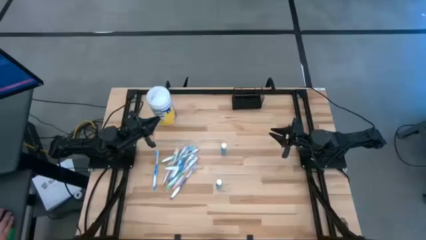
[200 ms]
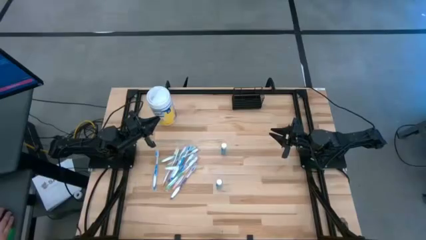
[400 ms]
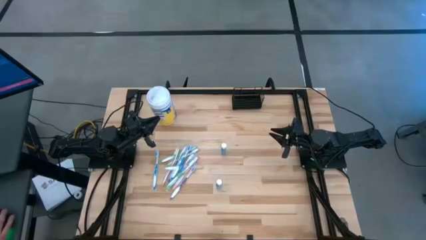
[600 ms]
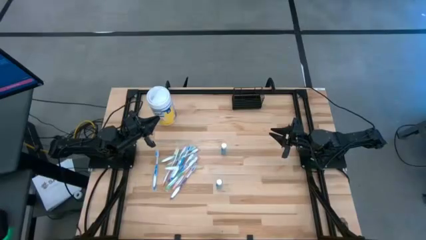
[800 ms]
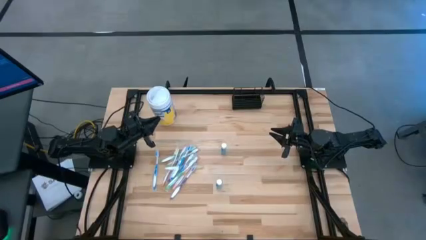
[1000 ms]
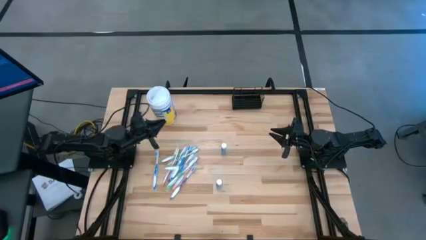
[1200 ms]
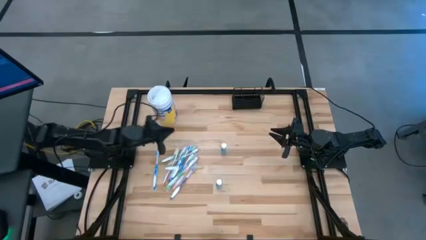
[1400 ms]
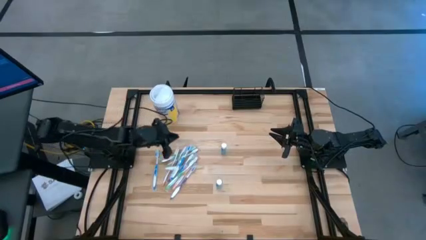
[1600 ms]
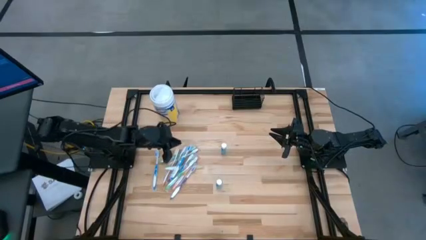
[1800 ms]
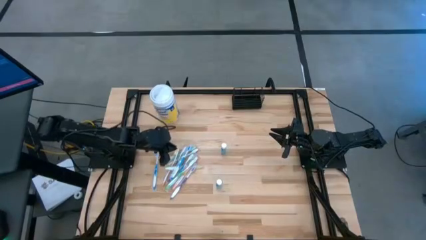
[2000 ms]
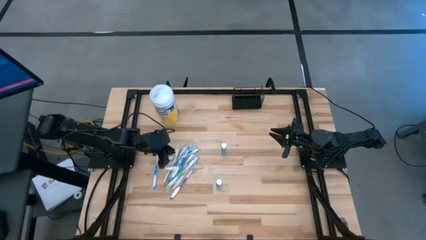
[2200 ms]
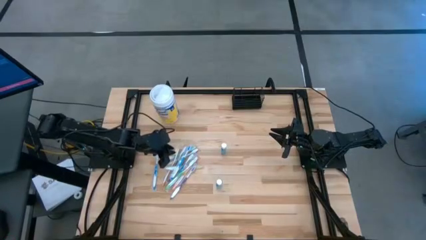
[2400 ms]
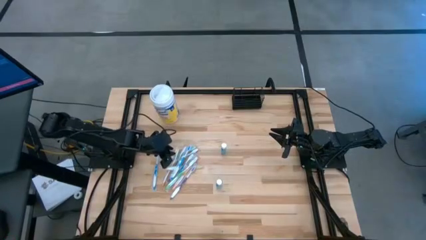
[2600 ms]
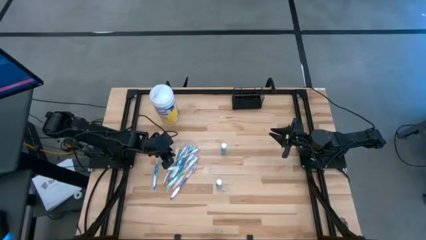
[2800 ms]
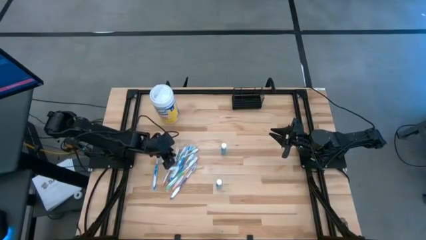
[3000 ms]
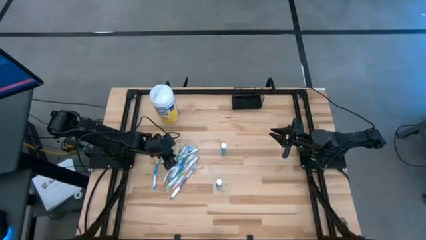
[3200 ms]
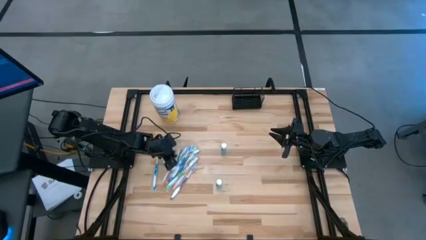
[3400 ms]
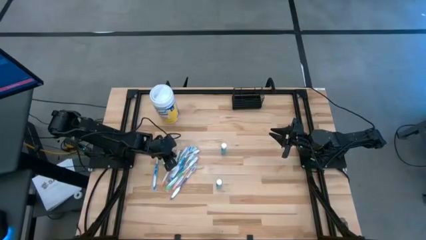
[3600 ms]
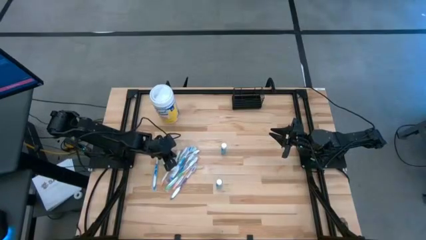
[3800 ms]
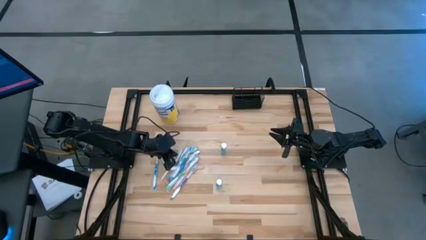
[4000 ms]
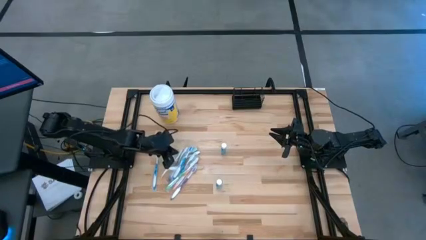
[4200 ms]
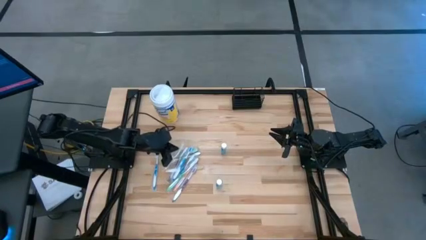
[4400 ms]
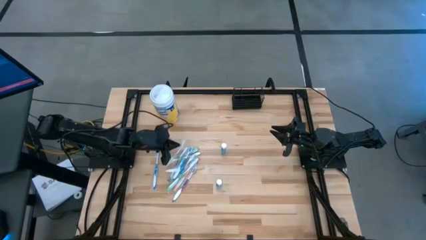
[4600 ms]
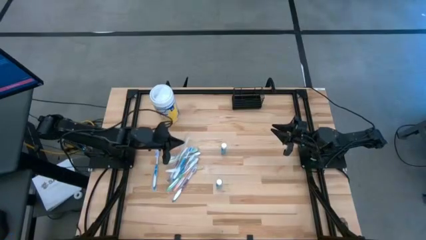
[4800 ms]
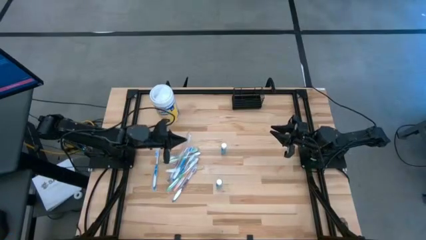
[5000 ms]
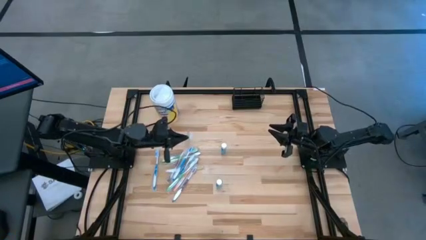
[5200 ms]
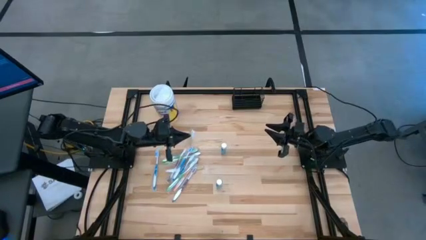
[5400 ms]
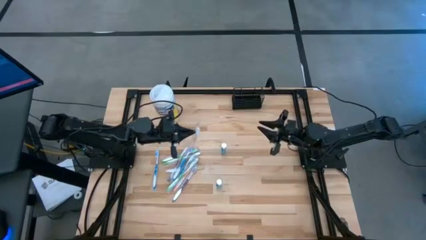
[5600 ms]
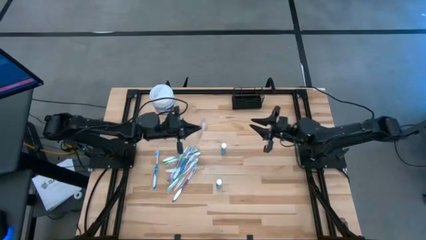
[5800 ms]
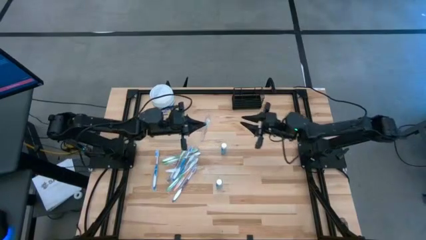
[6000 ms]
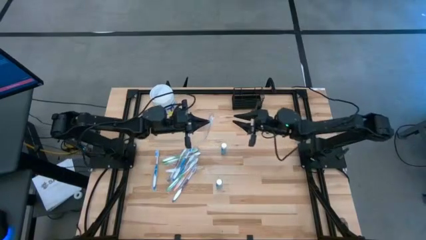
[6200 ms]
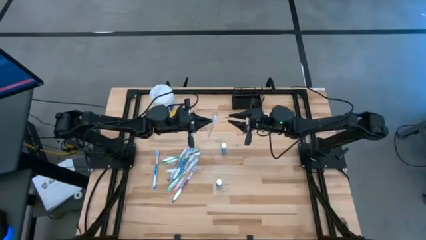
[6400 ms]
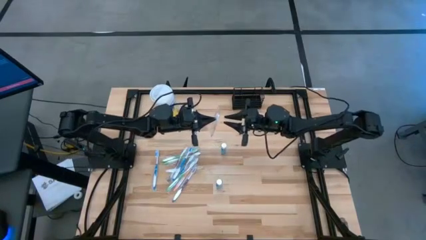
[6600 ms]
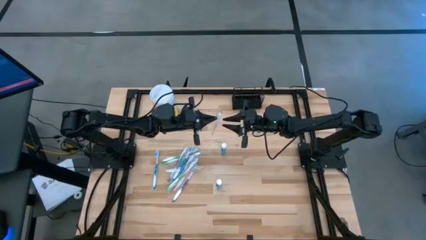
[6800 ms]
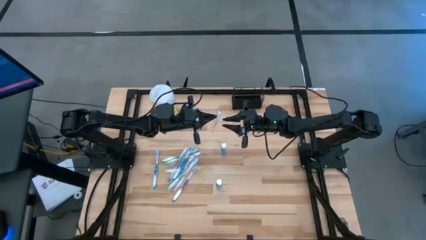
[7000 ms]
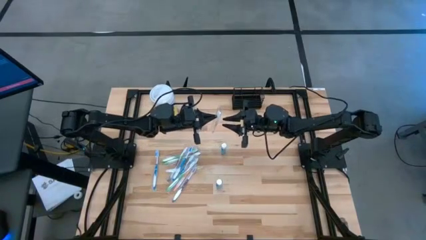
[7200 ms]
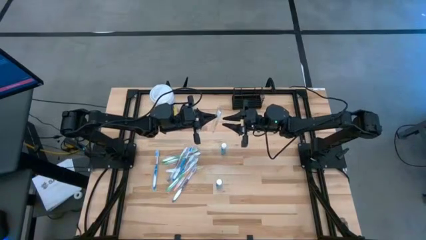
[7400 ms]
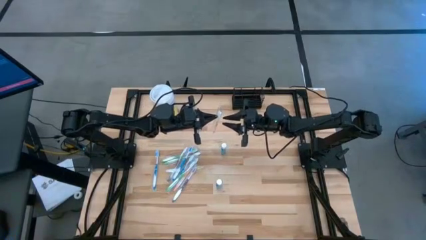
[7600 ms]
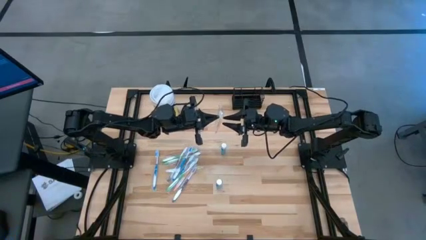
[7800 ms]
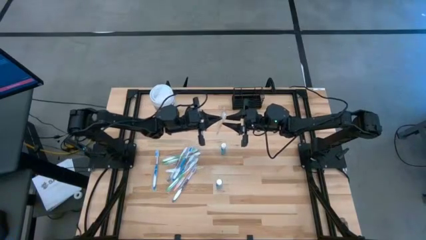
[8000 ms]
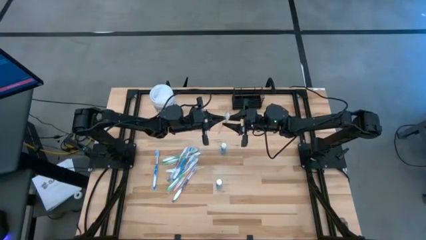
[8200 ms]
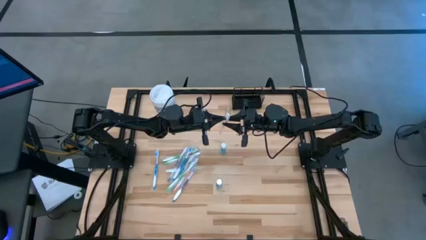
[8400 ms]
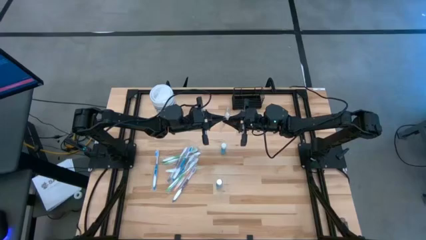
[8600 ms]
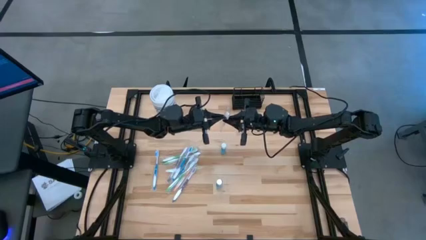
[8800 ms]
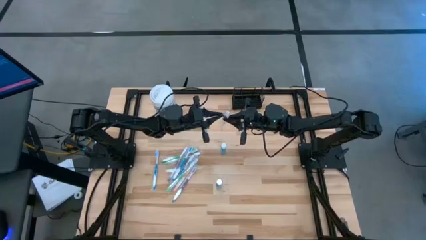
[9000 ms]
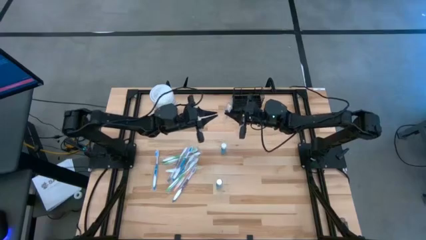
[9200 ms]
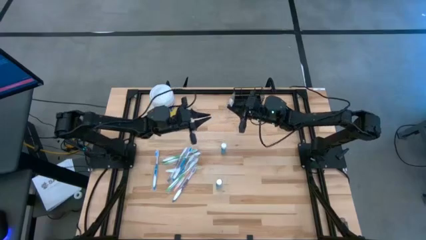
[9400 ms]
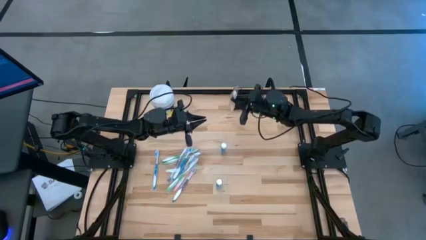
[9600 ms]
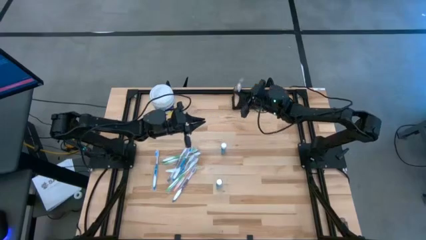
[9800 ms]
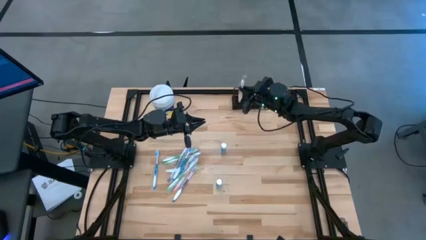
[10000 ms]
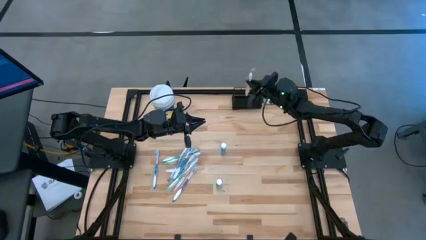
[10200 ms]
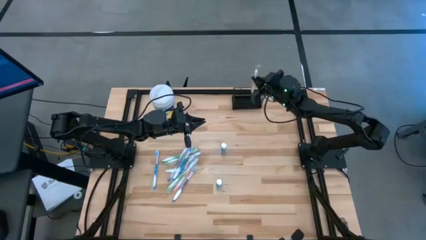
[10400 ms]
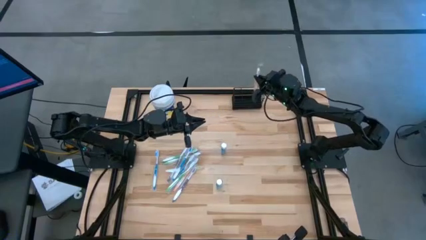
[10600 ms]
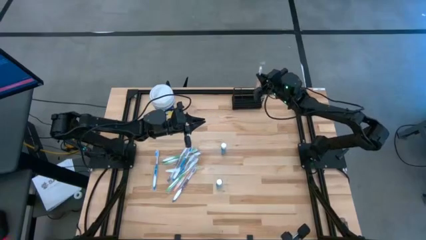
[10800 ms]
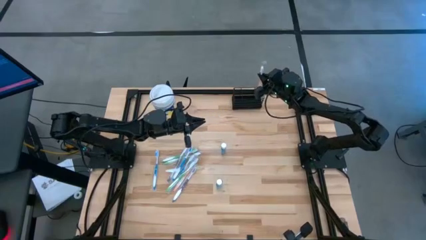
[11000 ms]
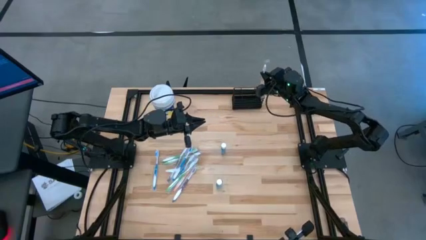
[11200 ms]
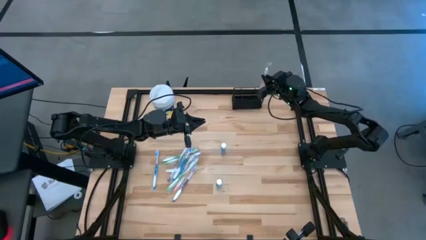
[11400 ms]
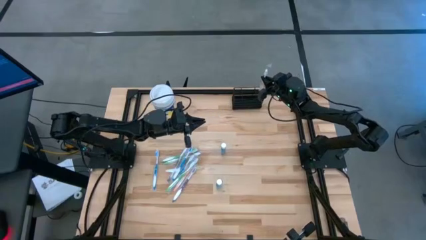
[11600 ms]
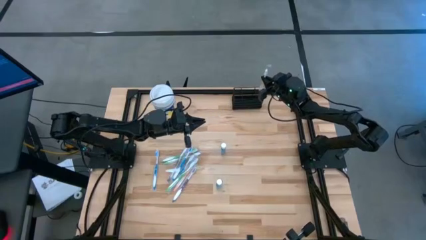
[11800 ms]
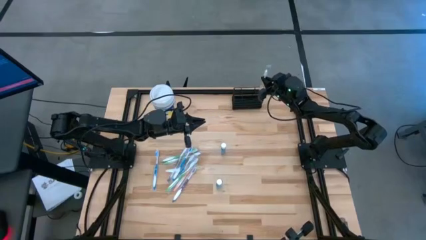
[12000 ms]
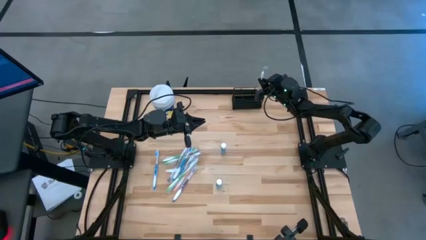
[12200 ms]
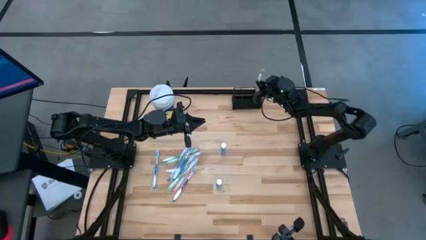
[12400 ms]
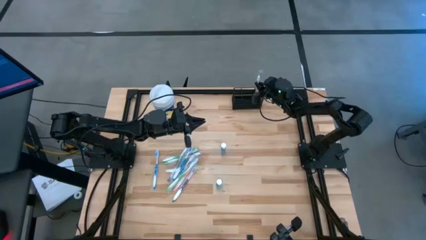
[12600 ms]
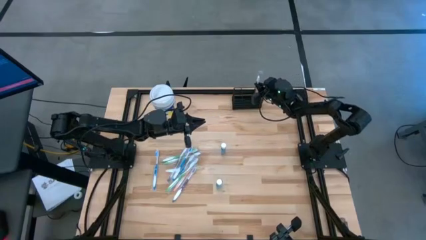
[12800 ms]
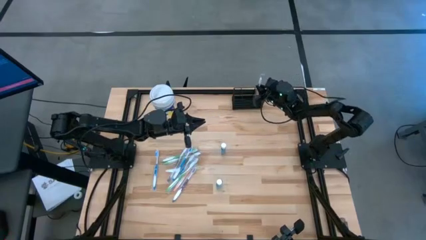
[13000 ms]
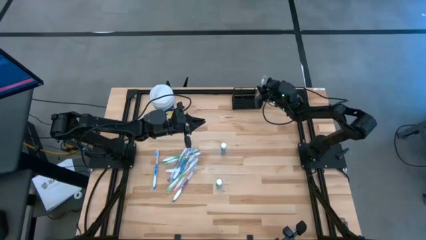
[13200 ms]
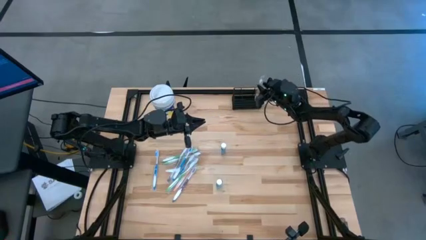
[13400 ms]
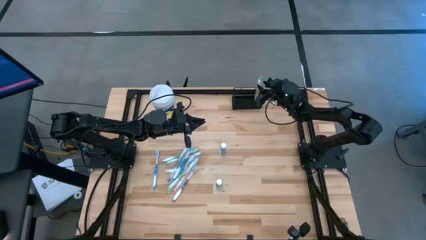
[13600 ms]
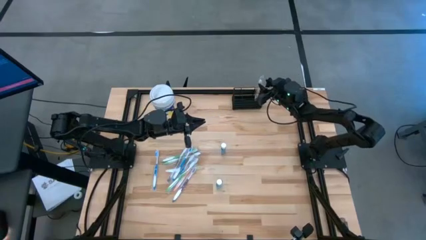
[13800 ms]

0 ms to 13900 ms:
Task: Pick & Place toothbrushing station
Put the orange toothbrush into the black mesh organizer

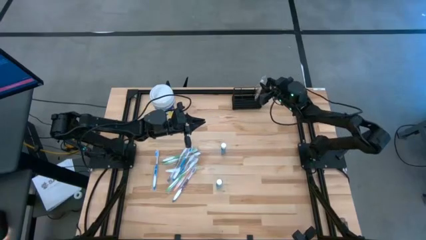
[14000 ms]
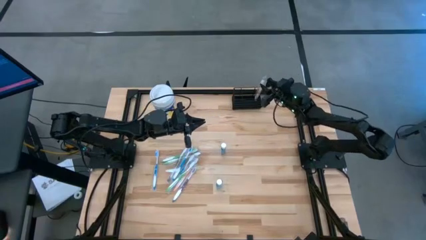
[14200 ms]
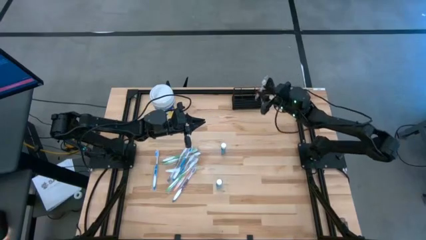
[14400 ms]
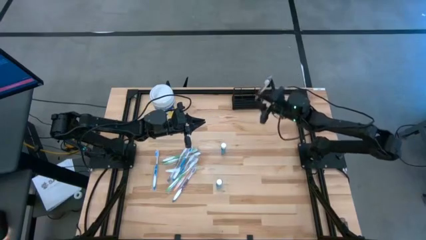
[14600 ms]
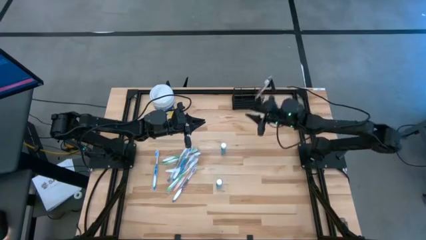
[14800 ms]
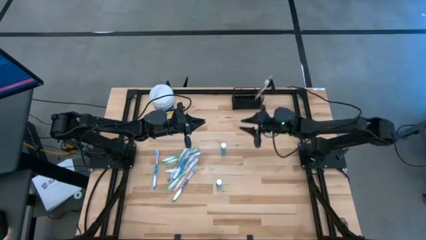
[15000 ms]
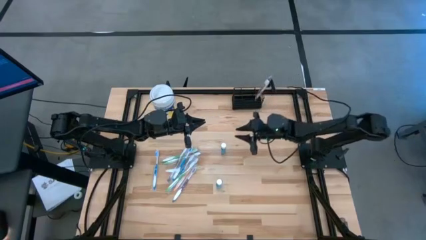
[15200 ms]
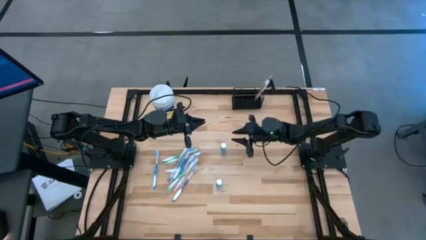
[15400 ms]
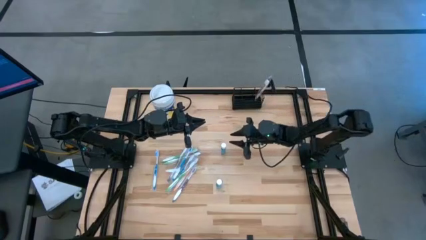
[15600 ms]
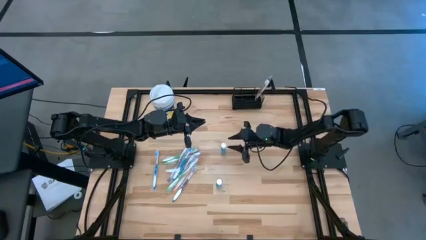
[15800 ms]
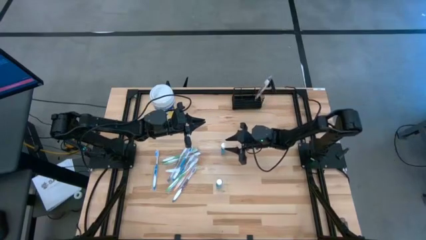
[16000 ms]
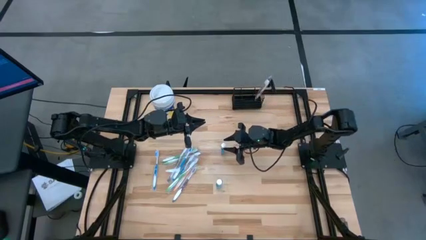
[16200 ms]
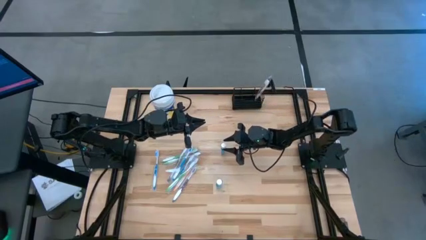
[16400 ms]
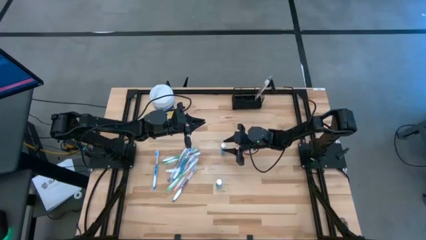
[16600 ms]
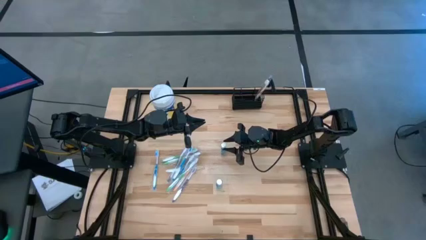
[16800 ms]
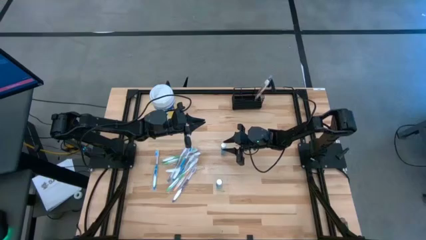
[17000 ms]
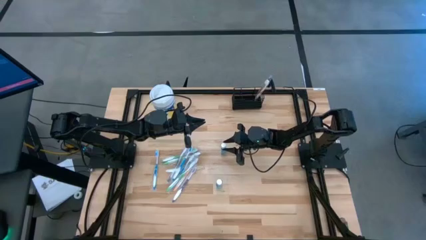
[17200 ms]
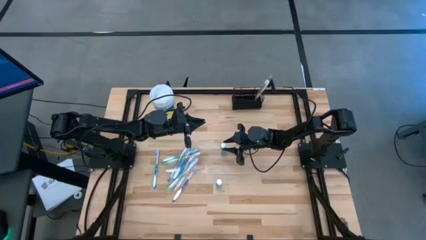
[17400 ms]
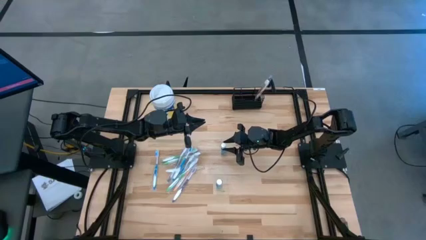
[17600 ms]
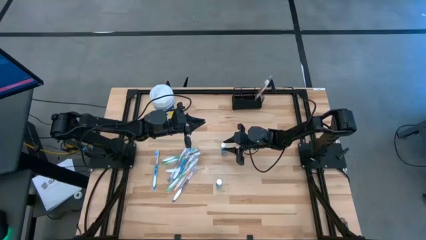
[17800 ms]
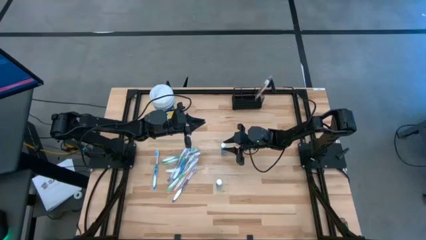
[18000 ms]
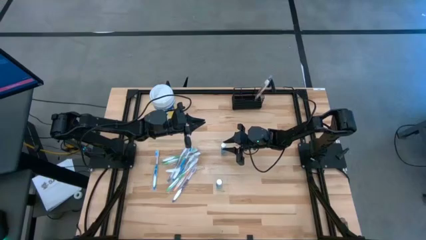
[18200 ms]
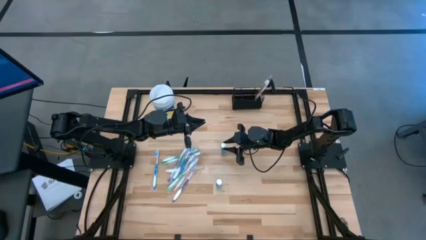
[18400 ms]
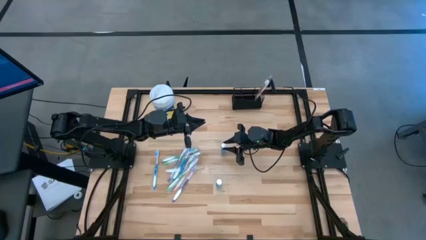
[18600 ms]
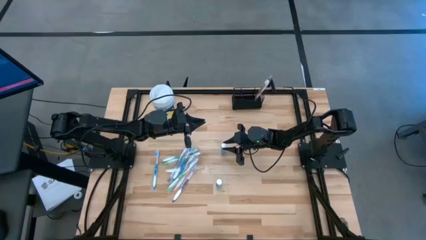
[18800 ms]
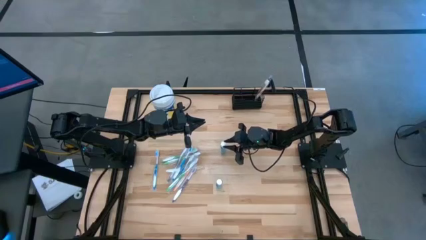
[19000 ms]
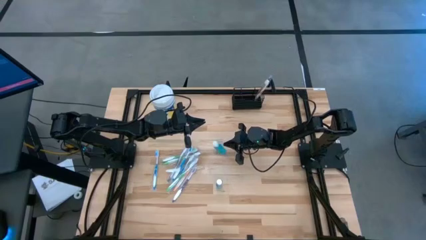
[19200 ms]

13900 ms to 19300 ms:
Put the mouthwash into the black mesh organizer
